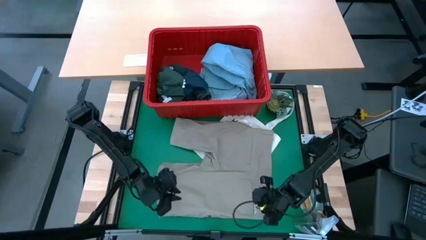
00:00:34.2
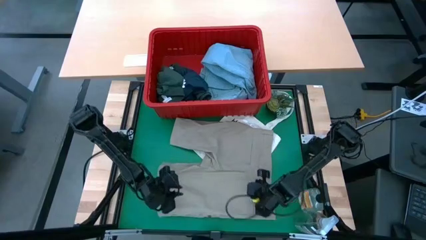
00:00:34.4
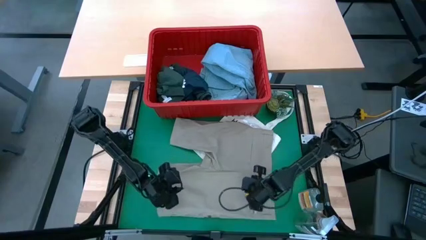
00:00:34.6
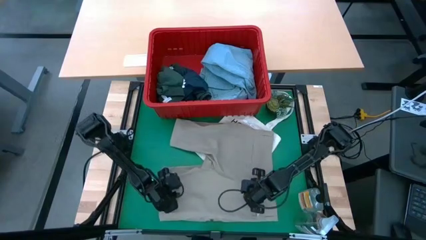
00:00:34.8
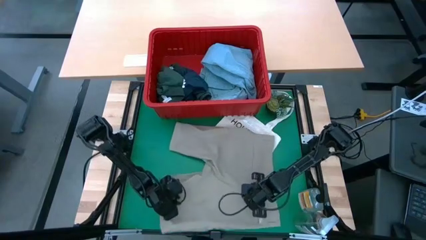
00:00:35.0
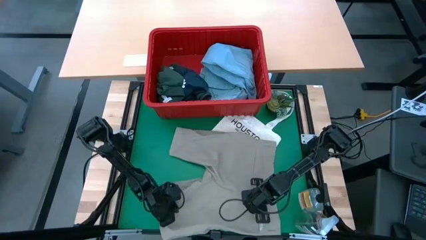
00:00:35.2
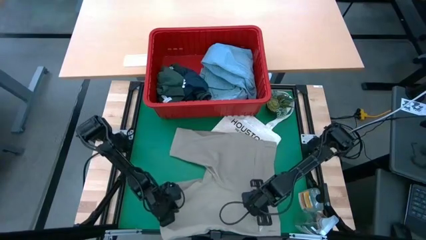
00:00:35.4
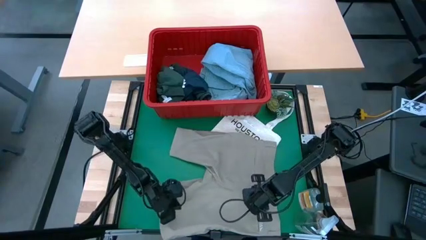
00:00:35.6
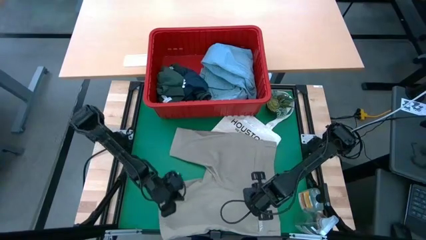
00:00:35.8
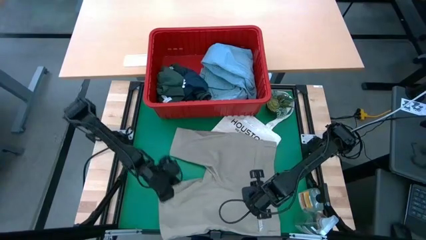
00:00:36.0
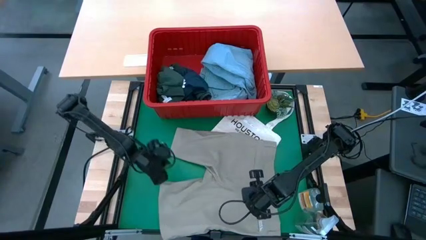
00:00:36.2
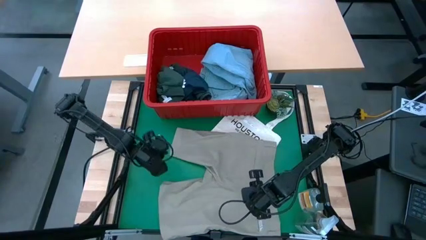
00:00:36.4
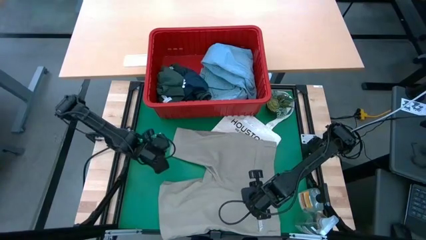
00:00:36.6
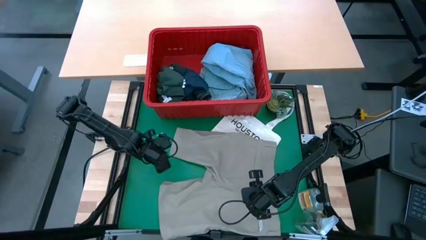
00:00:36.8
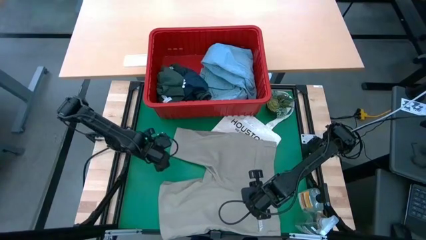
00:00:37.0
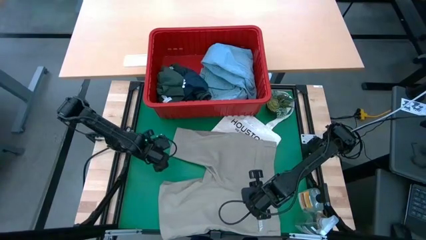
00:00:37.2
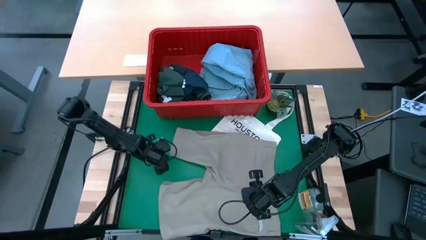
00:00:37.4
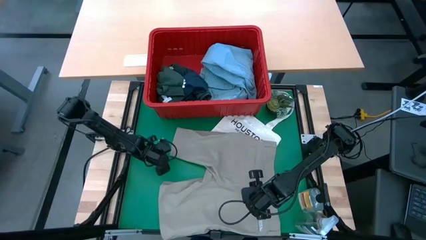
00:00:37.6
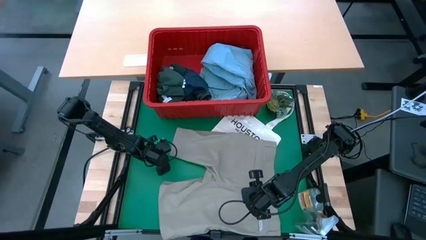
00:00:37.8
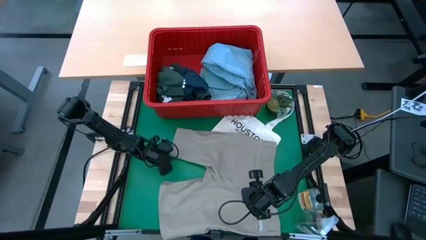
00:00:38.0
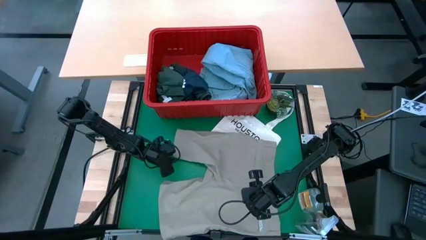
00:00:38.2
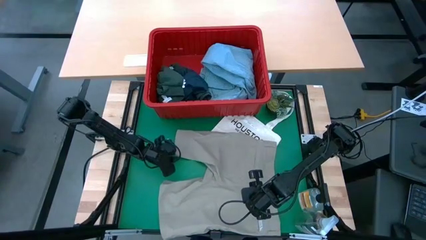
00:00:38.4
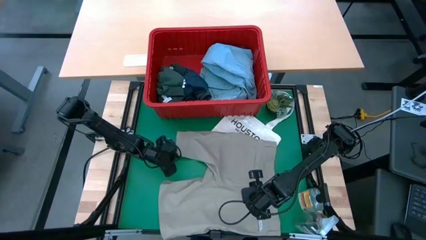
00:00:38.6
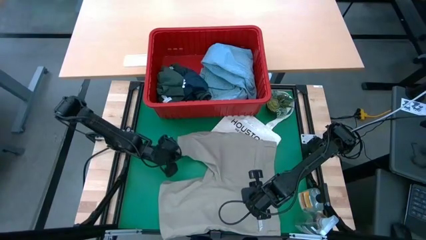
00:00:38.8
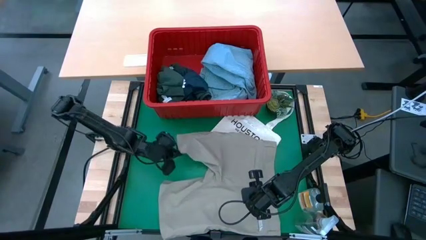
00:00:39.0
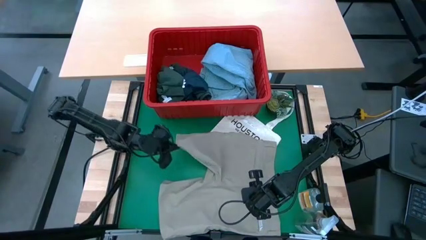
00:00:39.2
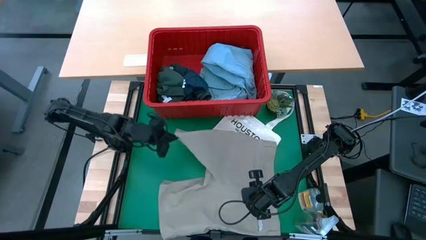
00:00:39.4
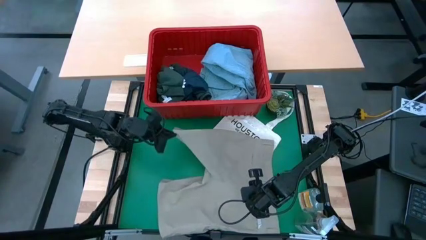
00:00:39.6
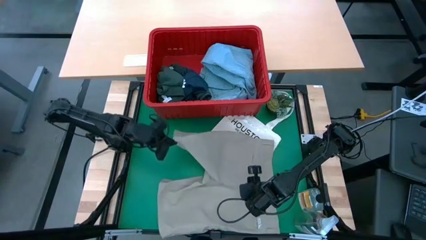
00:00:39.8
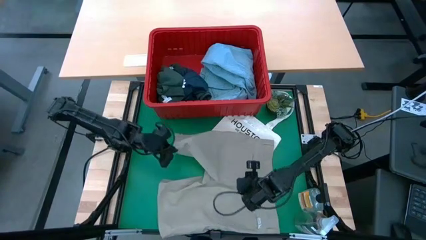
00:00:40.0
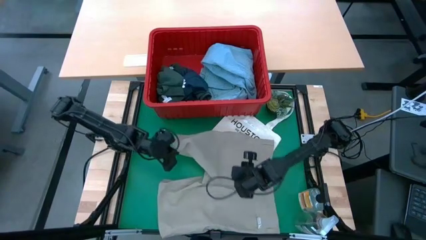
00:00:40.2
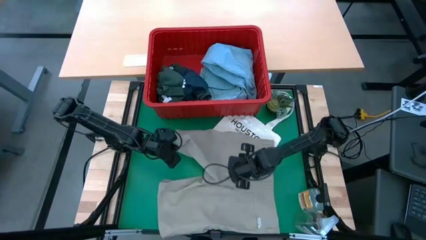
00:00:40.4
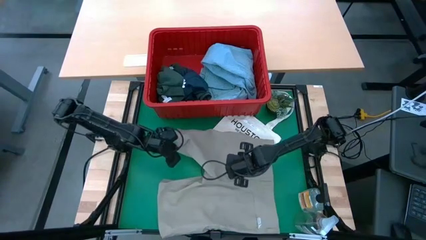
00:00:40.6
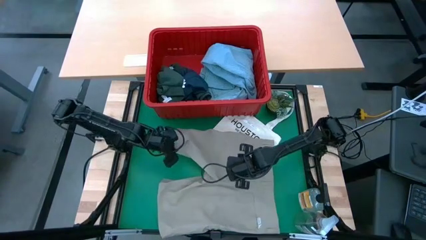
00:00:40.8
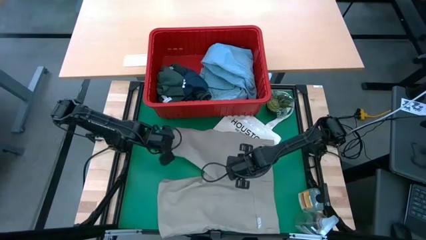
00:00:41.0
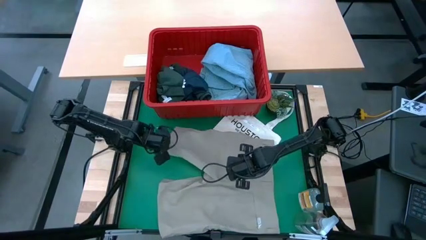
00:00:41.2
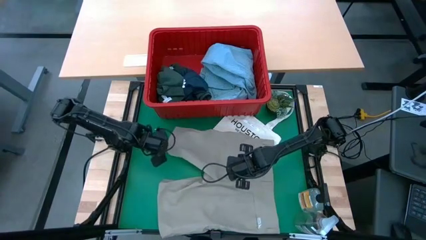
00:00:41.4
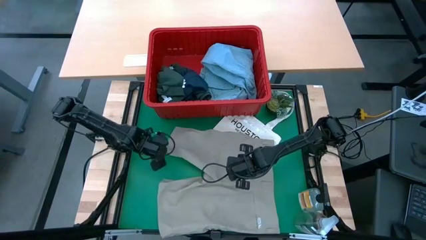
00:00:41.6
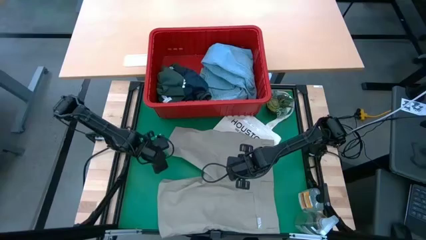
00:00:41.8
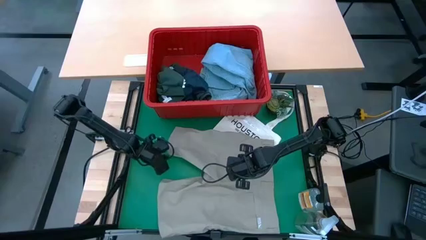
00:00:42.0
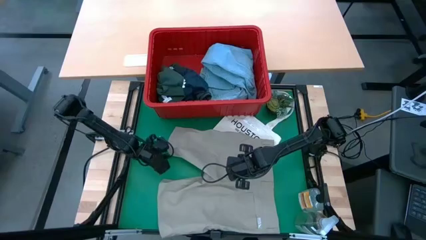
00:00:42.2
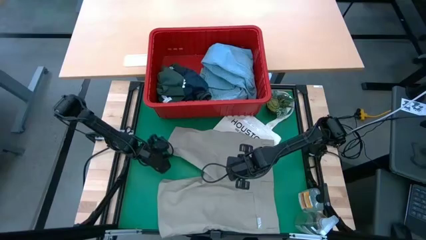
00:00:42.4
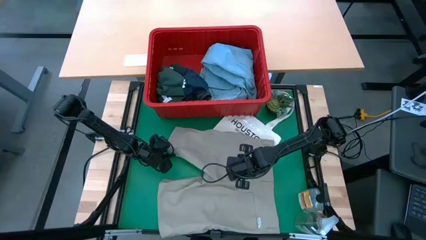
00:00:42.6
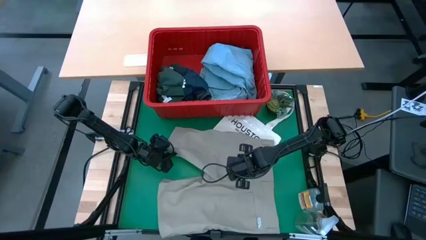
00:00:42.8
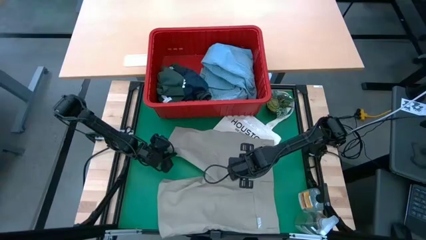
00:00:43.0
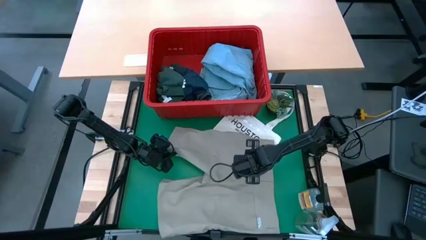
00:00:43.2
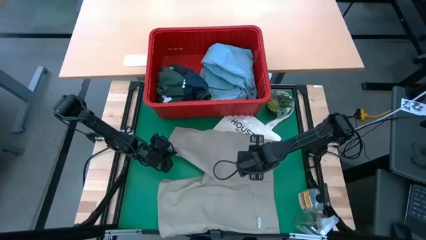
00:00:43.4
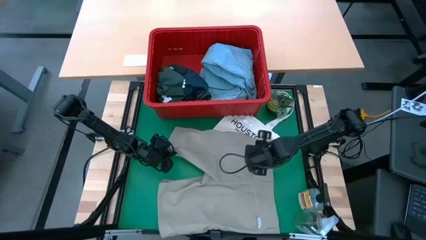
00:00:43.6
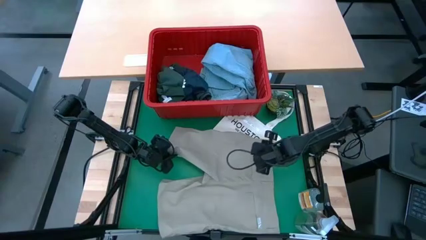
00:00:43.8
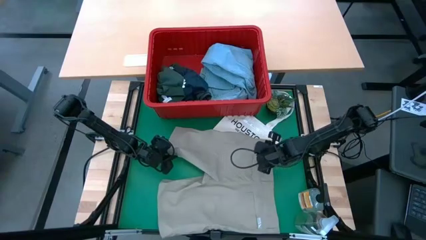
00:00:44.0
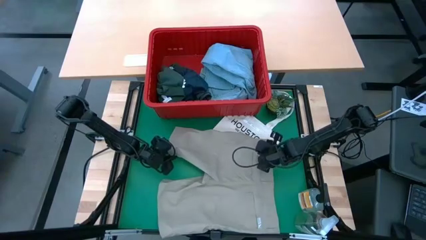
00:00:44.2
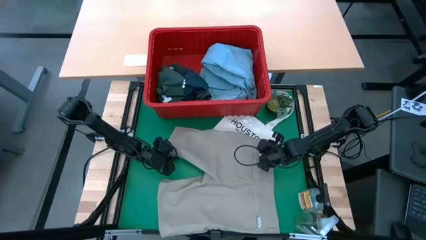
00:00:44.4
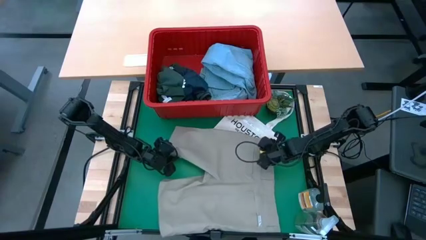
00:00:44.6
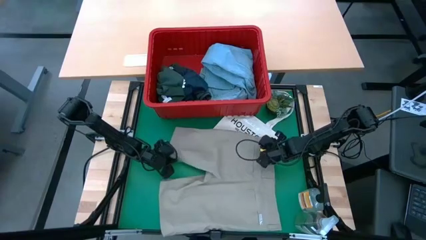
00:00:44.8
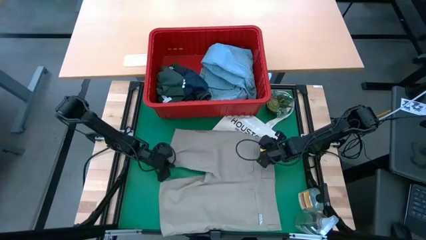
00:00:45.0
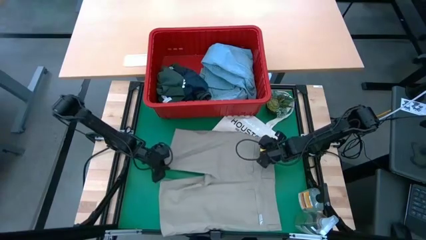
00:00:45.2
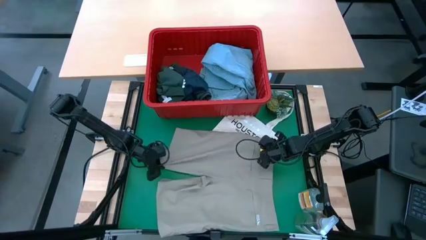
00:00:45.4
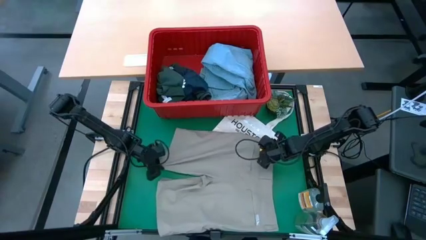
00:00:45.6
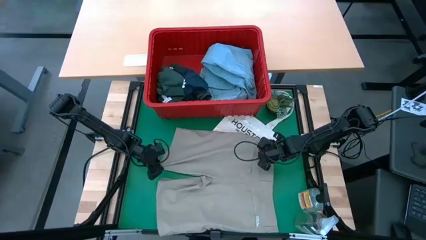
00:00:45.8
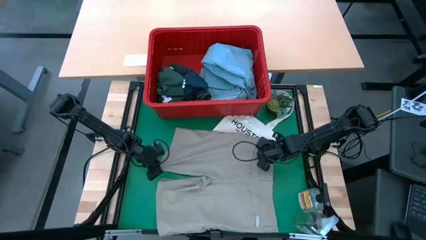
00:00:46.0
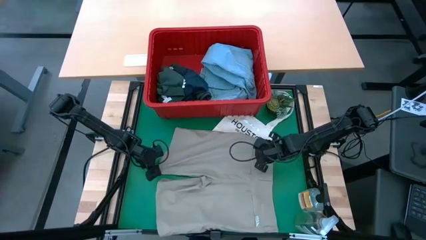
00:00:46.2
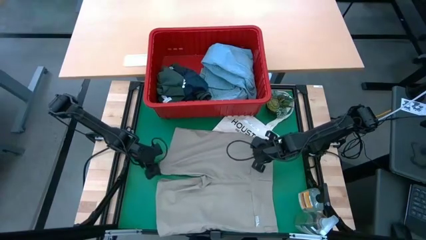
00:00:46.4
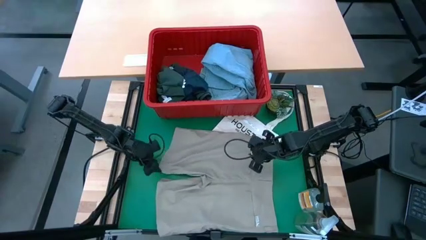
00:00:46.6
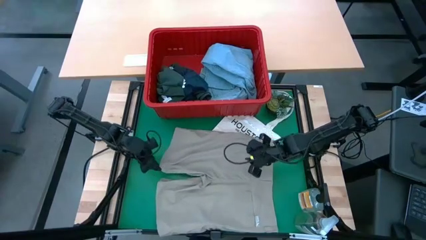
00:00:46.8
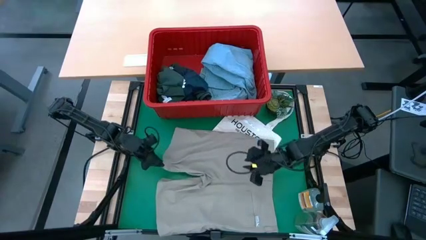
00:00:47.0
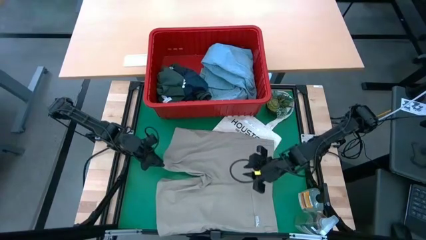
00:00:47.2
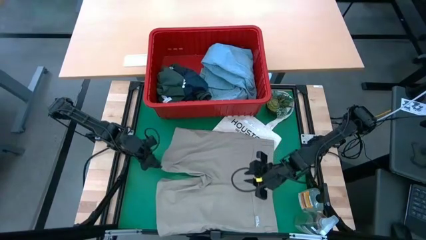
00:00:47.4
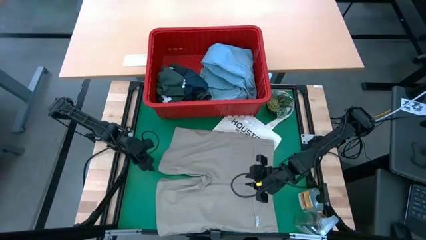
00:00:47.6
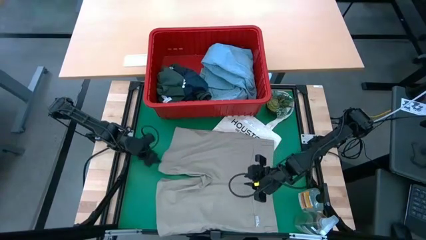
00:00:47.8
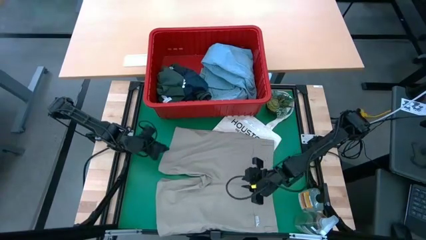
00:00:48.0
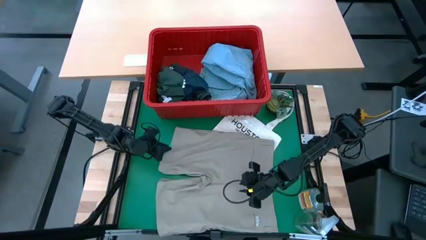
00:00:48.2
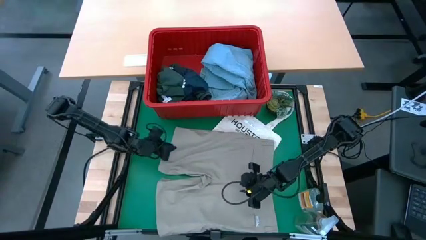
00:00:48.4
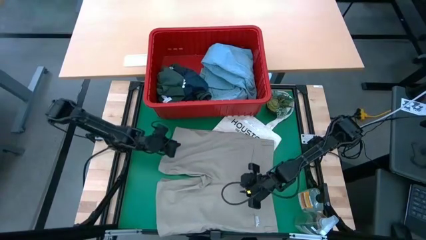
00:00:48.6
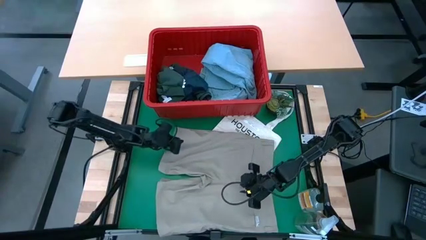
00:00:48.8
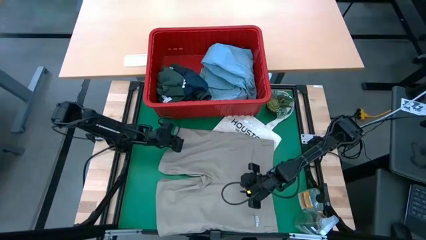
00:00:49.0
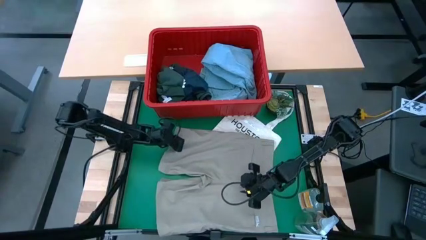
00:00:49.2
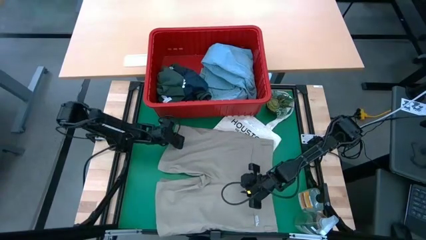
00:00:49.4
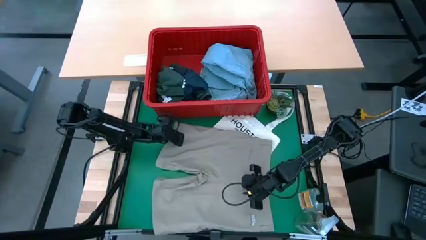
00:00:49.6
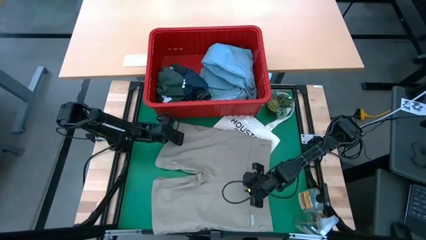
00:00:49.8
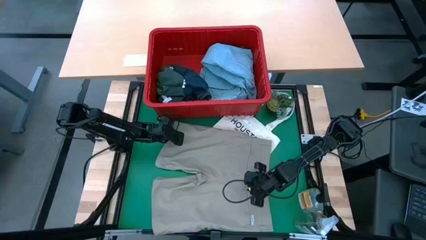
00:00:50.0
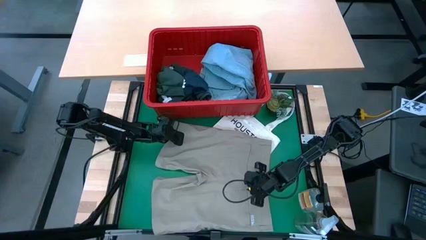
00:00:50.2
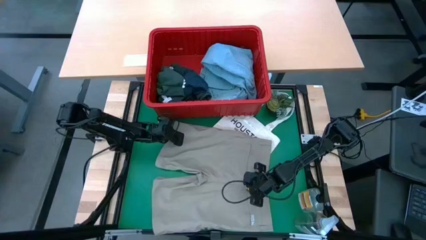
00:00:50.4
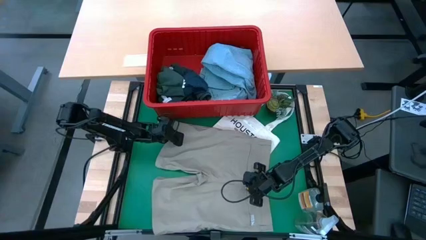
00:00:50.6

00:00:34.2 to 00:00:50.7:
Task: Fold Laundry from Bin
Fold the brown shorts
